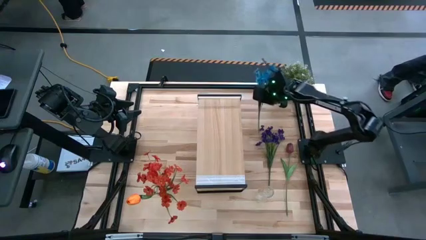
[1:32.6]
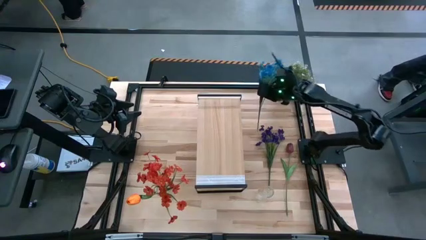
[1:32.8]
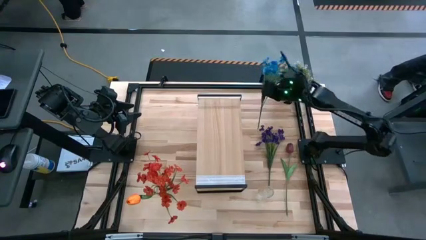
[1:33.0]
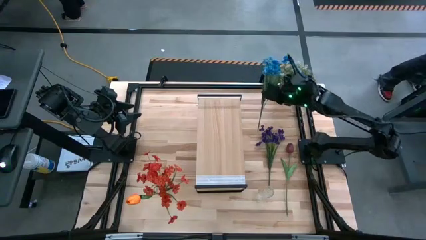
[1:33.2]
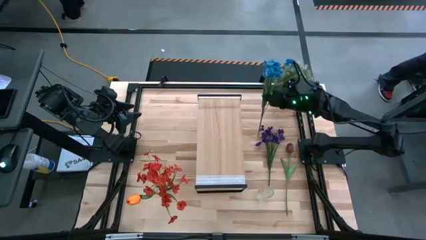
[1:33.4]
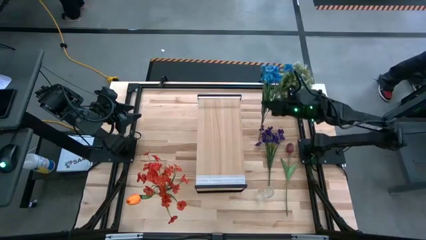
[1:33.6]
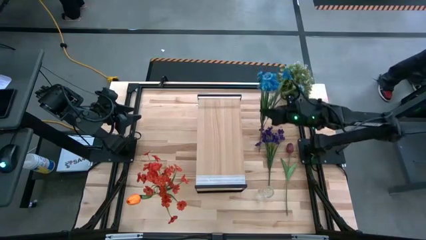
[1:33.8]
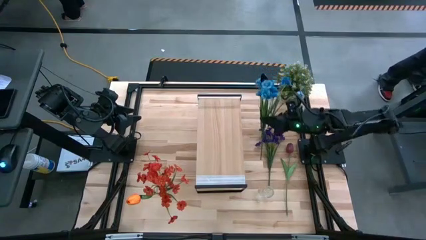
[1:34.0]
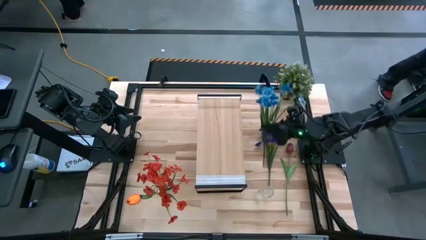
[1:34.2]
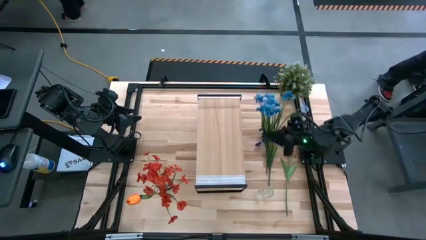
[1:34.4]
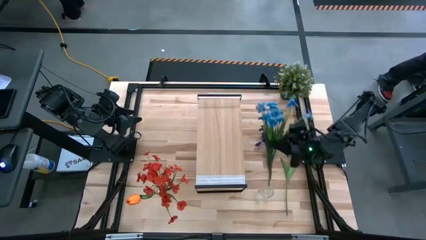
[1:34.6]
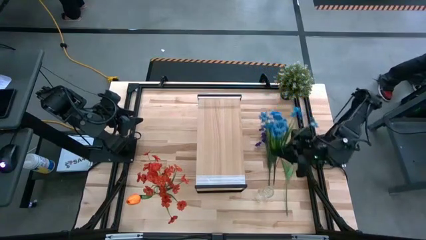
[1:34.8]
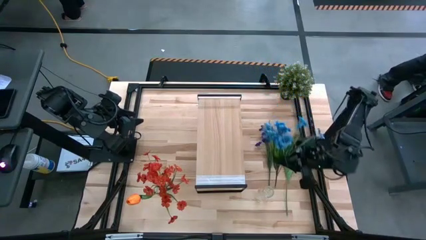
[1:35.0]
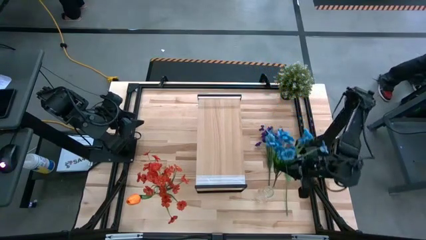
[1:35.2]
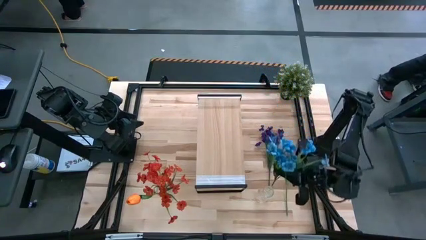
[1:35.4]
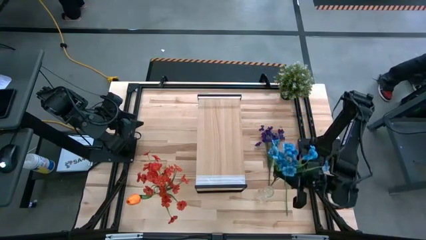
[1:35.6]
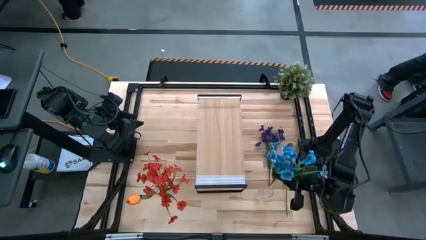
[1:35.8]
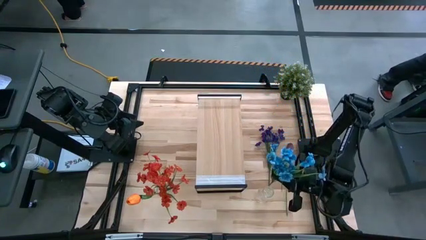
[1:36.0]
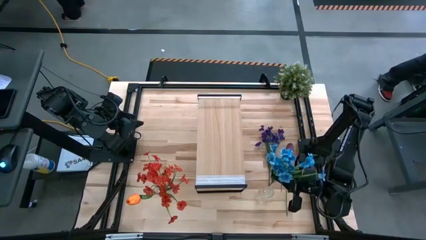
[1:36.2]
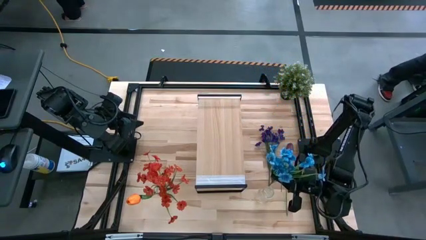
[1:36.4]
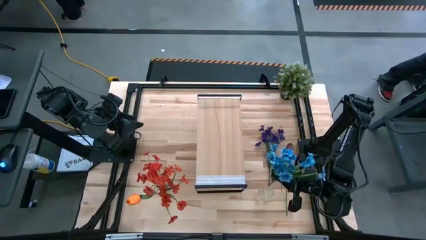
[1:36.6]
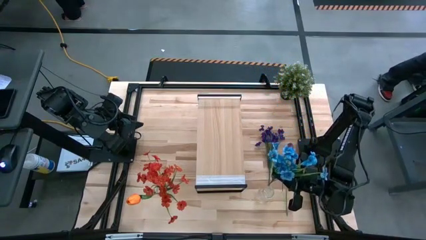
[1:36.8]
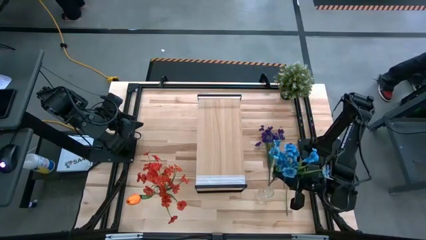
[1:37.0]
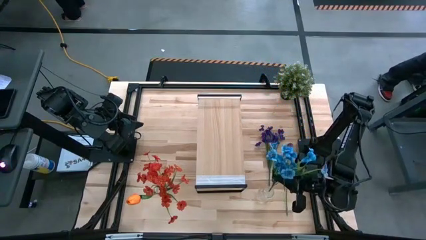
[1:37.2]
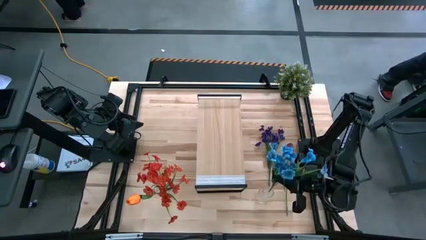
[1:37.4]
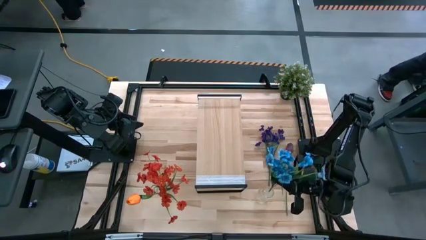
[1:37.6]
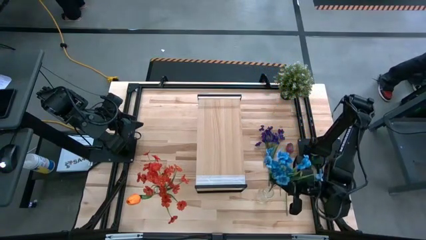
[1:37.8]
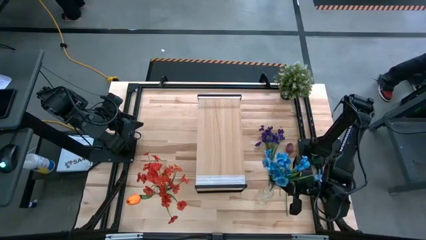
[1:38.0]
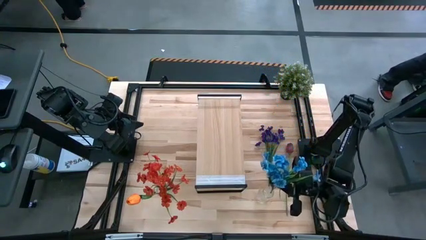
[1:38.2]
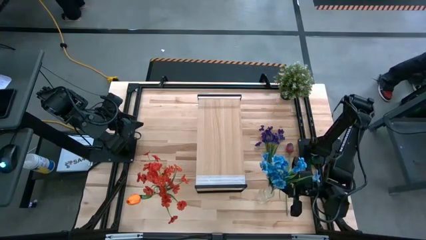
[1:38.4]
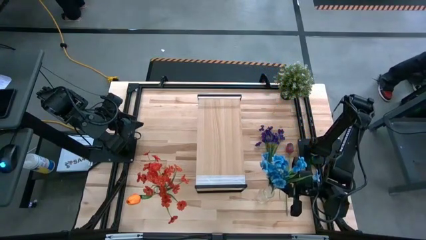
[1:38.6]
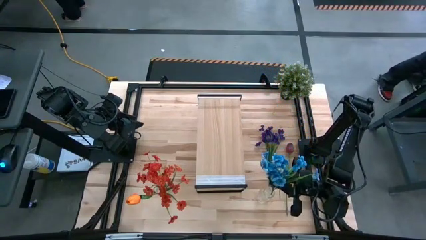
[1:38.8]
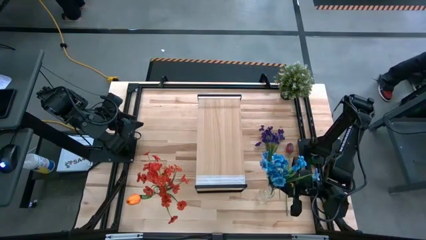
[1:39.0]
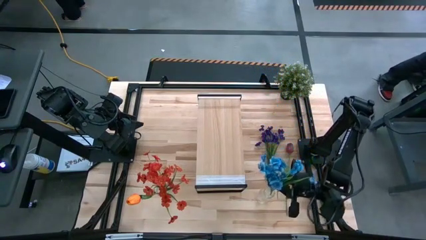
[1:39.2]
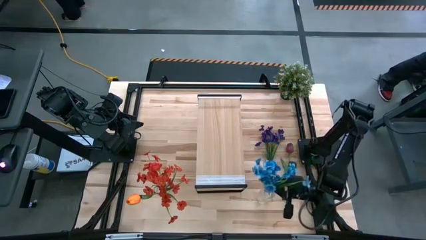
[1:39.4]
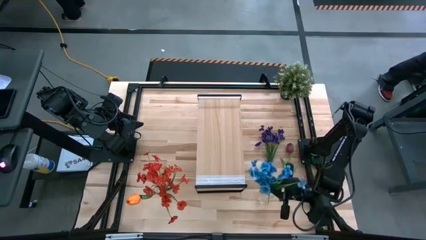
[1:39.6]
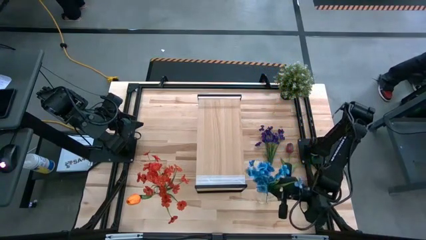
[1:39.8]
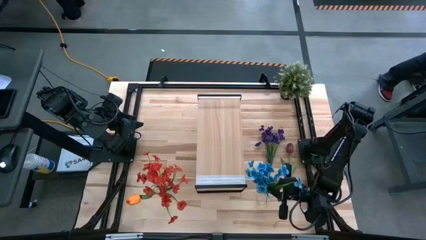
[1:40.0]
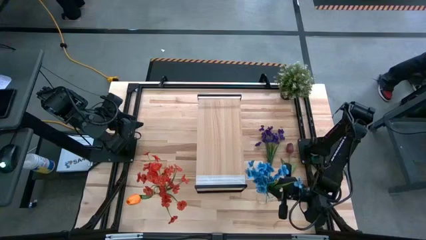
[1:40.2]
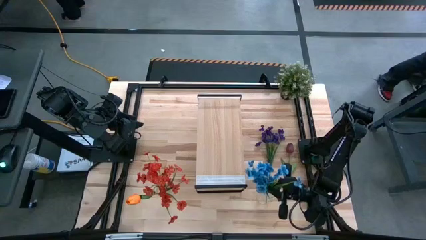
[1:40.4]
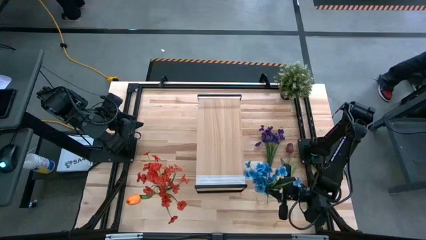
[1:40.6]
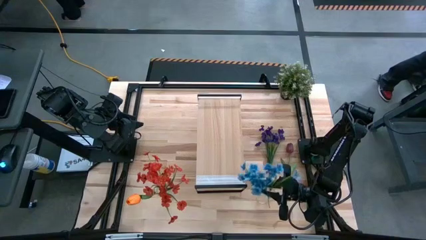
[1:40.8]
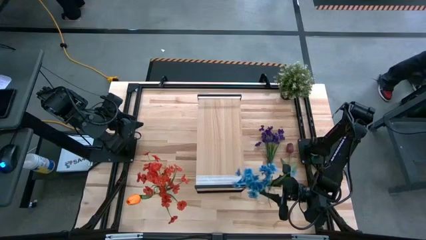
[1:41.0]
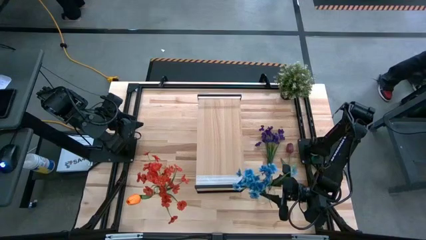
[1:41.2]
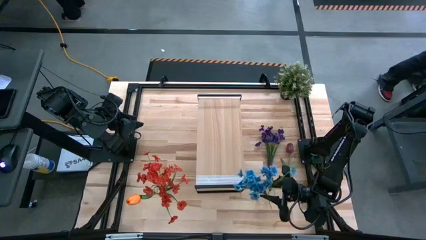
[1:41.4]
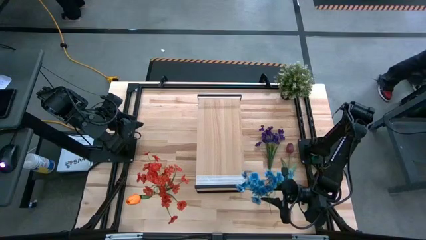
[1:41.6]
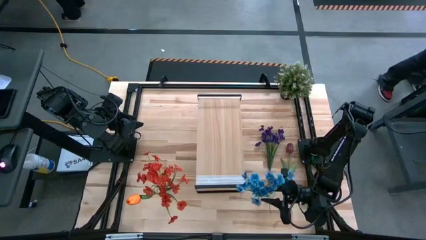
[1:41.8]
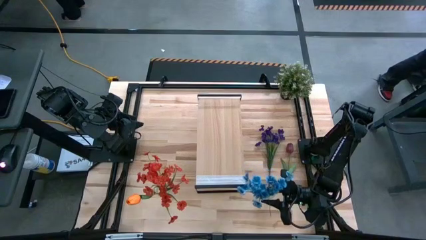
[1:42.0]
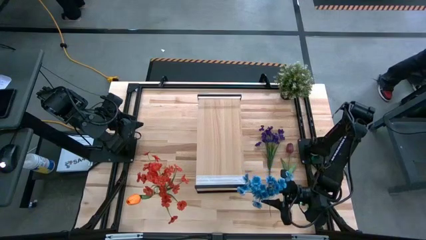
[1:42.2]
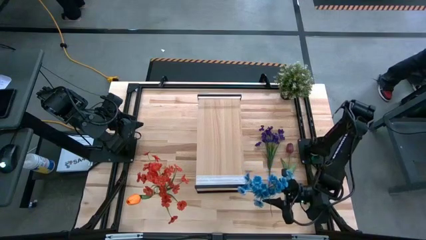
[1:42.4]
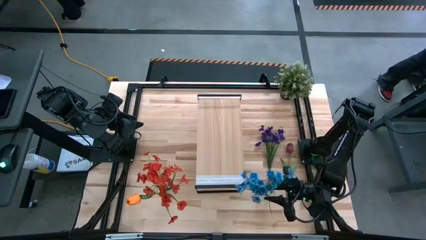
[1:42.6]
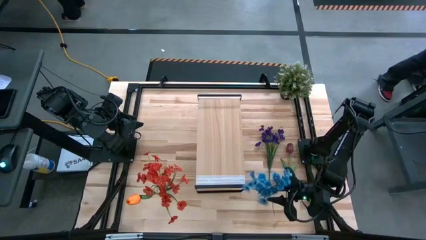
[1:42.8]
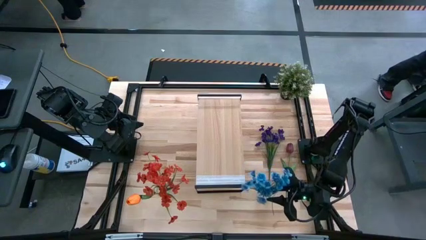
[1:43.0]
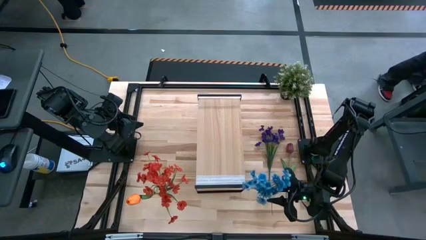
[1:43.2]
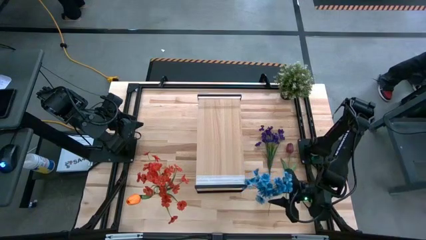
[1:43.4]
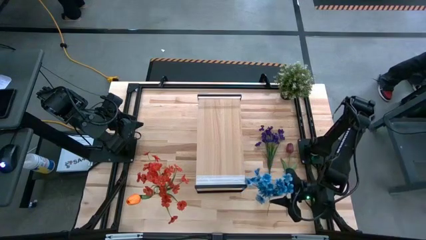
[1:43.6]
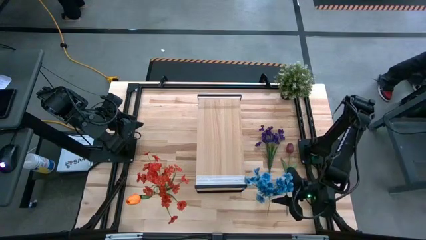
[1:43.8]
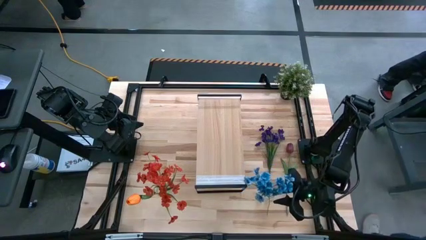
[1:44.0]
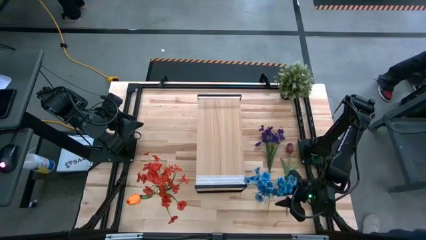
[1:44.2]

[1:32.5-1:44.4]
Task: Pick and place flowers into a vace then onto a shelf
Put the blue flowers into the right transparent vase

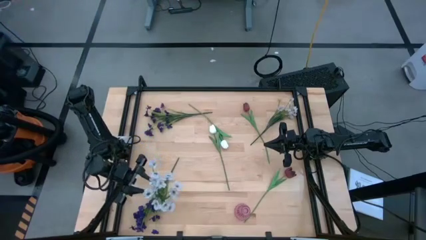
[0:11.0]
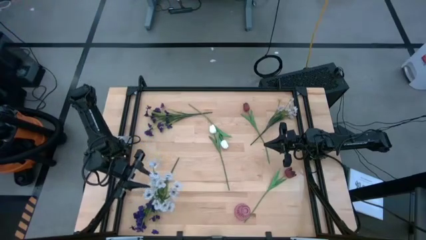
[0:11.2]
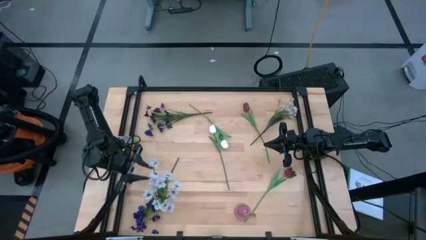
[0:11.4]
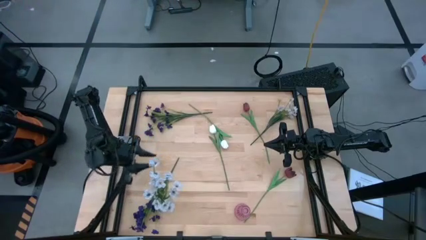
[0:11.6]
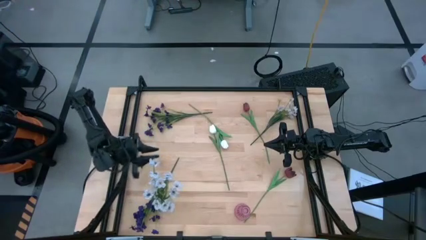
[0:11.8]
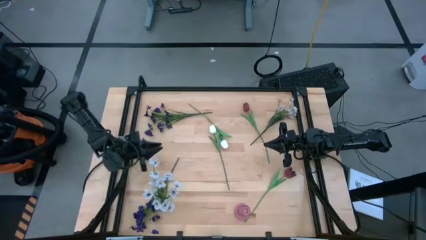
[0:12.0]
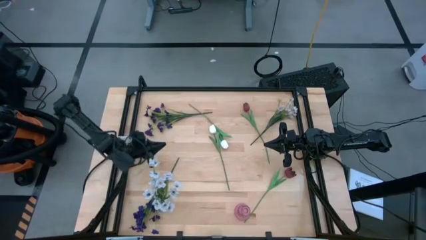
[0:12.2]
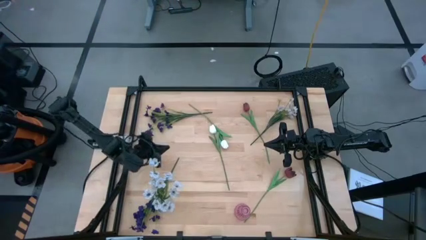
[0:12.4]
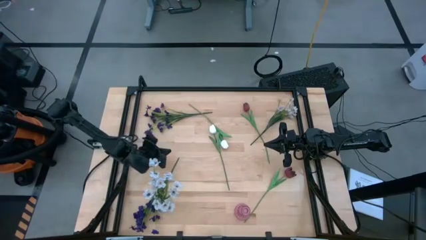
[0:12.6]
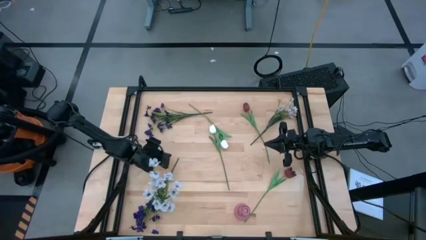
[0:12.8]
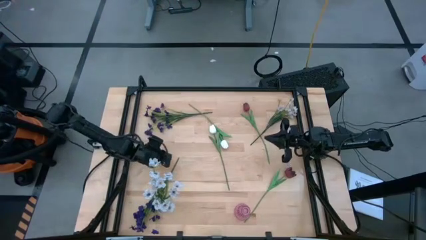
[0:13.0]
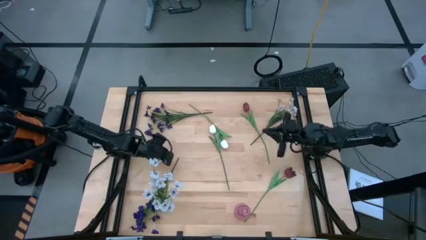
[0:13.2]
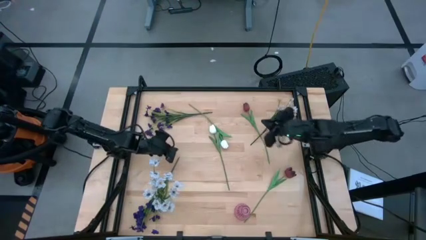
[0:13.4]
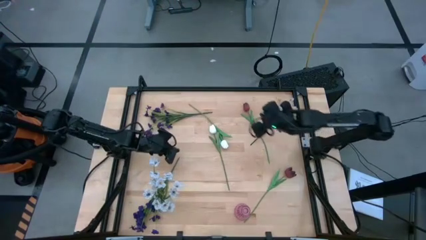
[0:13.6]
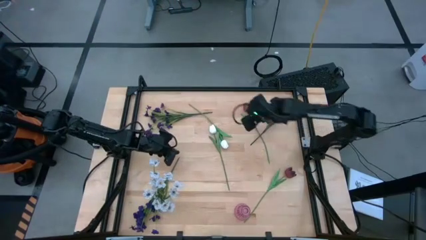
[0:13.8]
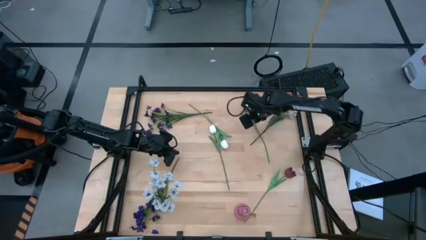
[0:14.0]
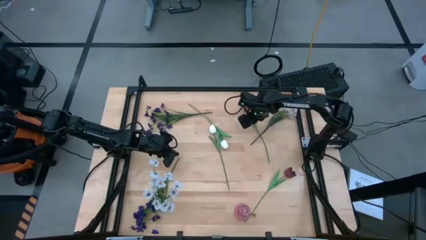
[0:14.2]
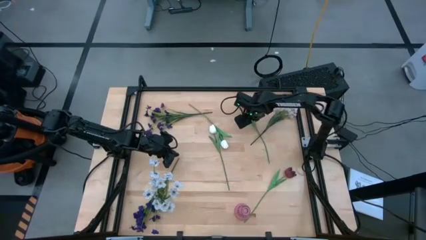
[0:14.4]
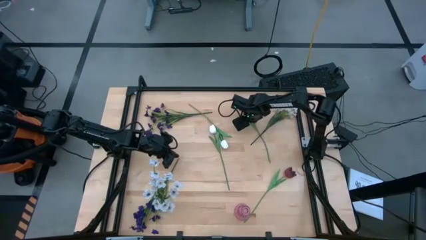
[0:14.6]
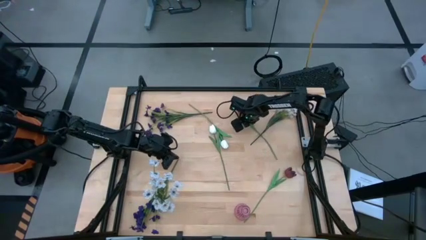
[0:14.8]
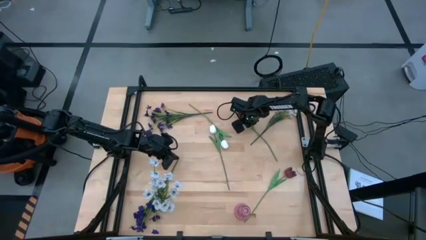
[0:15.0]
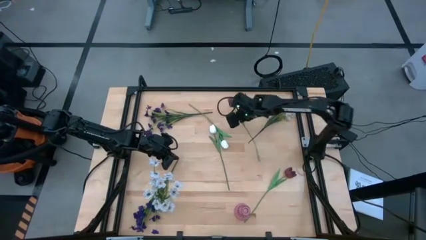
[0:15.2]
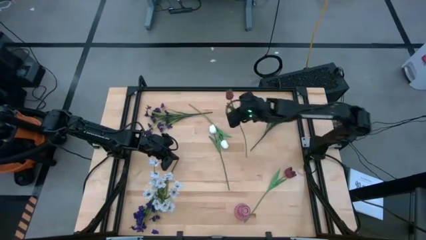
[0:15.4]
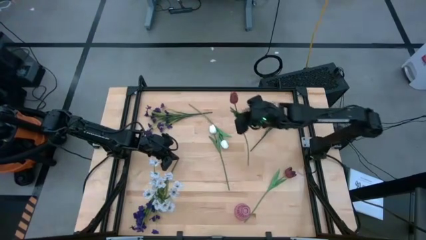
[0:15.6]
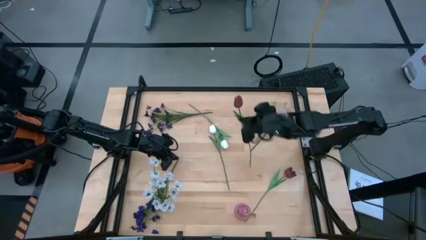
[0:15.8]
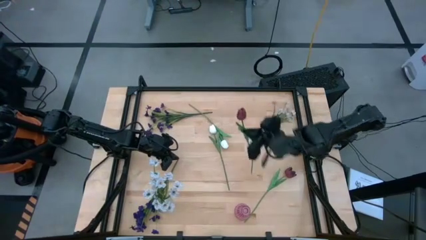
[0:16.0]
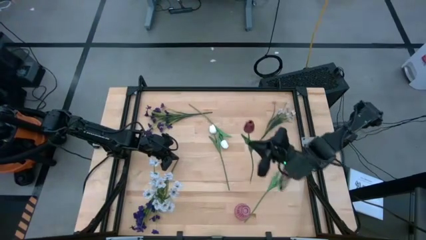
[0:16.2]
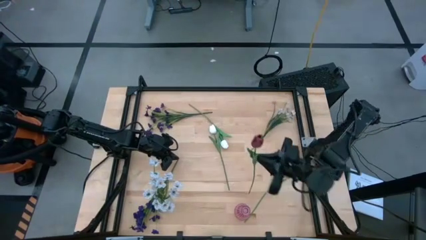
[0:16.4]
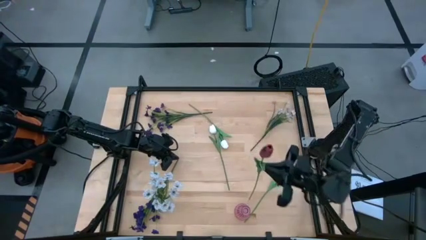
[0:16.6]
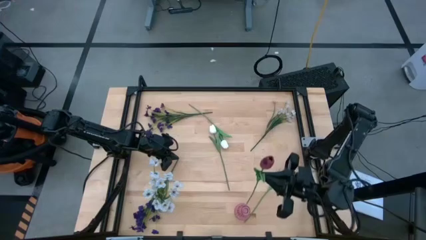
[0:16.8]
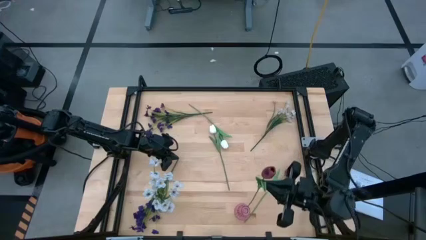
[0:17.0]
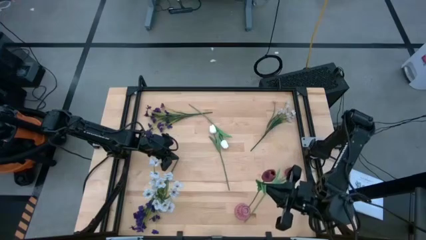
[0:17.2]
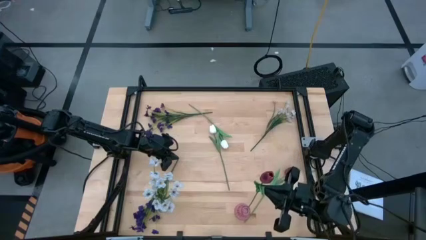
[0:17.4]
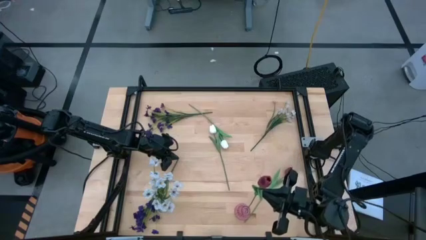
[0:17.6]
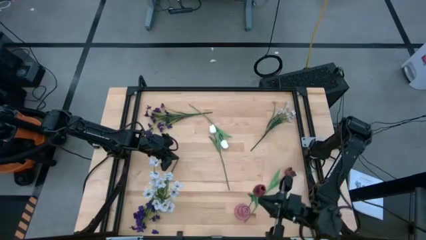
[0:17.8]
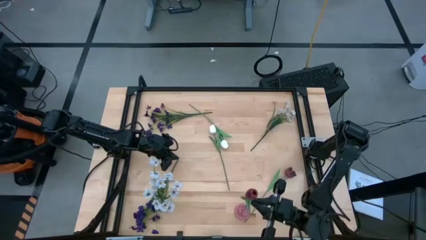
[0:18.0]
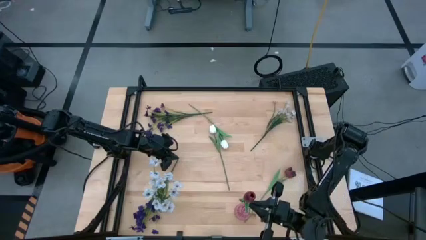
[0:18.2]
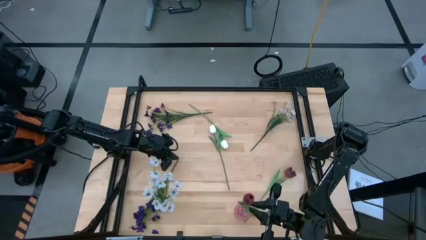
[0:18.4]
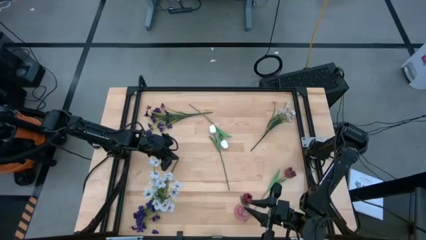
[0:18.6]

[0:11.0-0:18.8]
Task: Sort flowers into vase by color
Put the top red tulip into the pink vase
